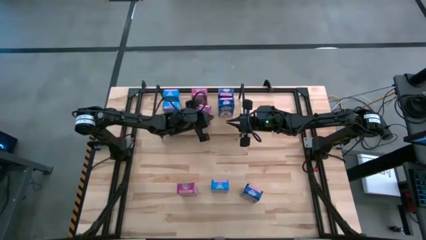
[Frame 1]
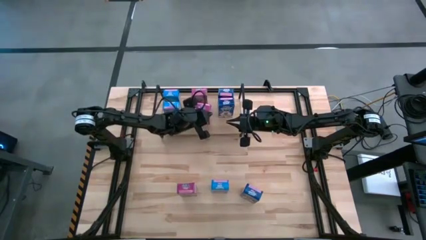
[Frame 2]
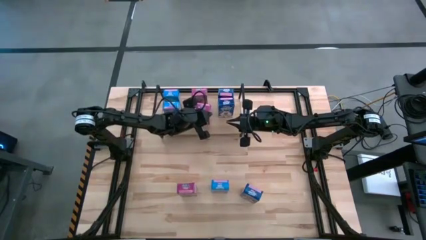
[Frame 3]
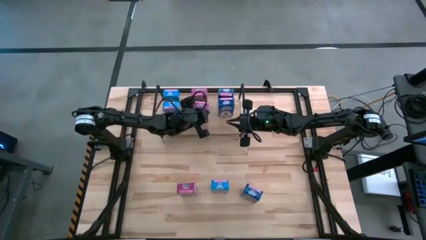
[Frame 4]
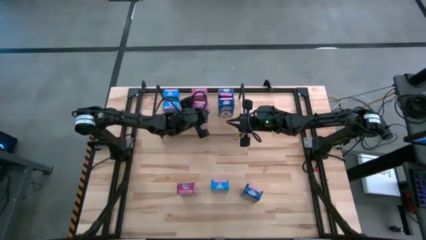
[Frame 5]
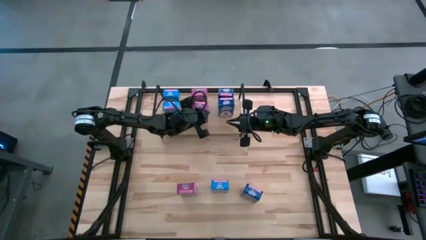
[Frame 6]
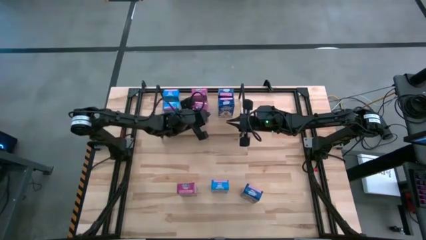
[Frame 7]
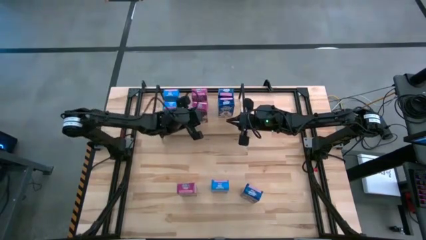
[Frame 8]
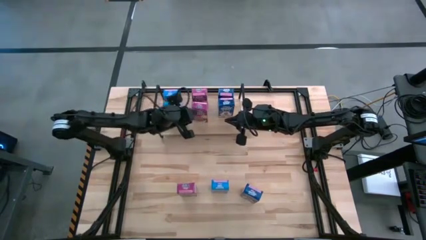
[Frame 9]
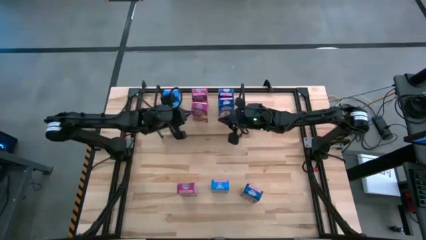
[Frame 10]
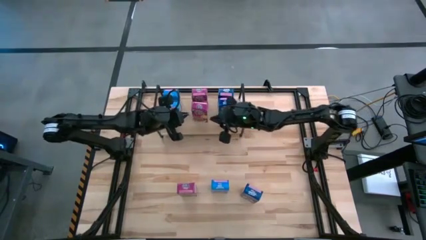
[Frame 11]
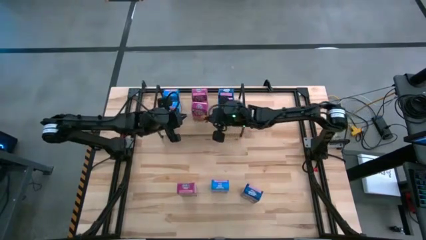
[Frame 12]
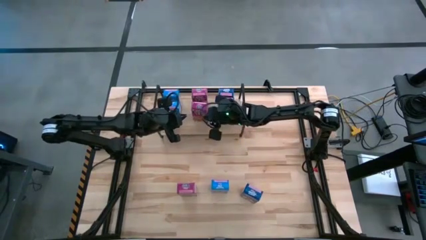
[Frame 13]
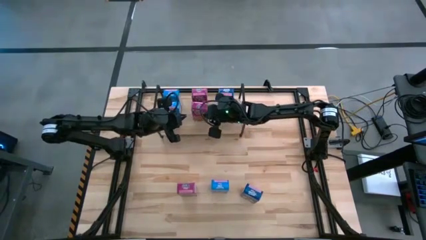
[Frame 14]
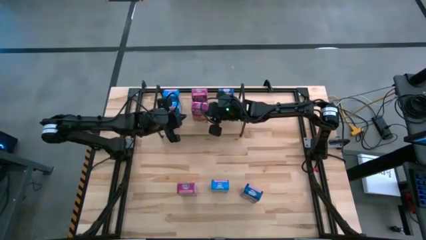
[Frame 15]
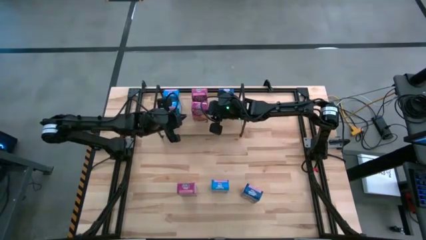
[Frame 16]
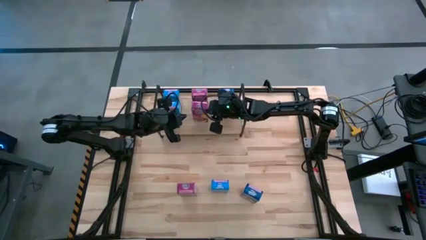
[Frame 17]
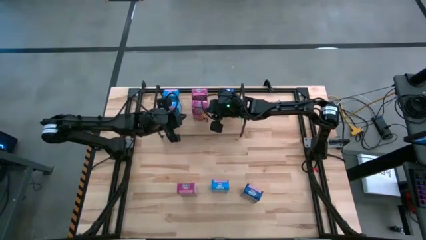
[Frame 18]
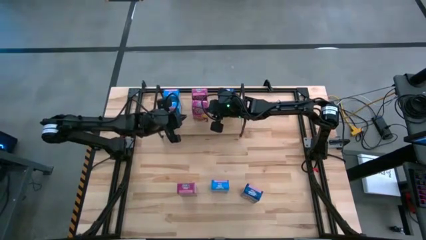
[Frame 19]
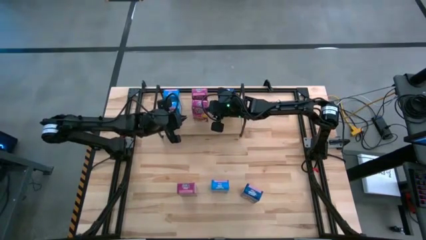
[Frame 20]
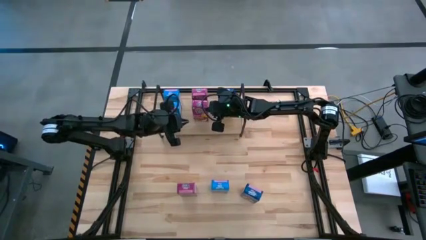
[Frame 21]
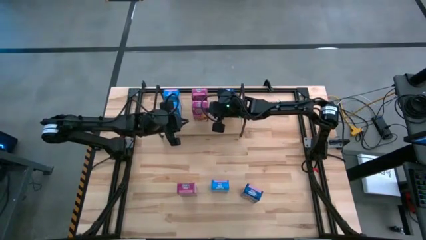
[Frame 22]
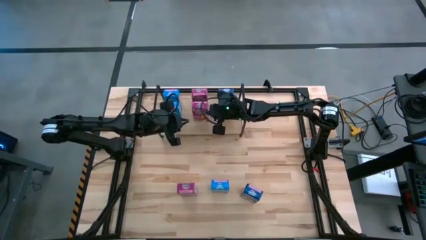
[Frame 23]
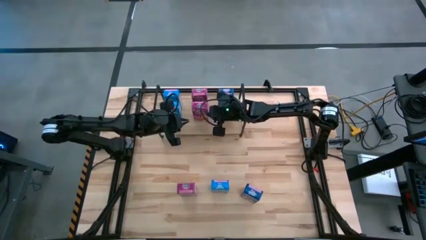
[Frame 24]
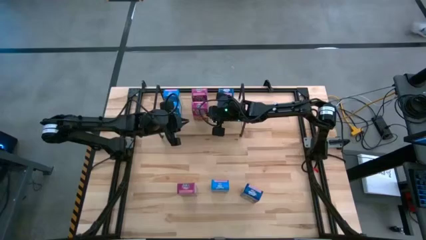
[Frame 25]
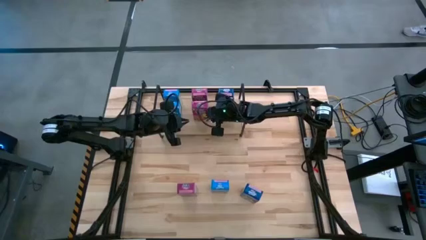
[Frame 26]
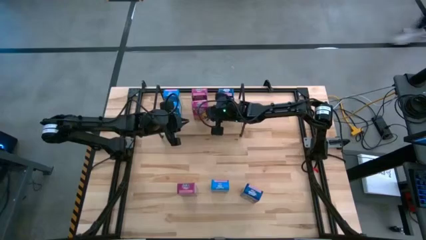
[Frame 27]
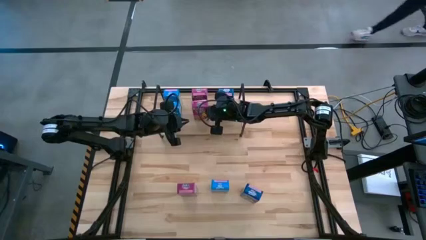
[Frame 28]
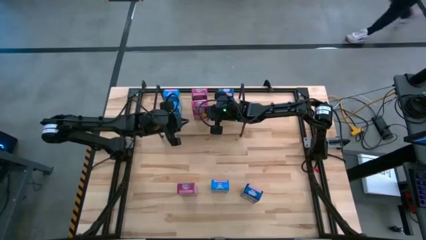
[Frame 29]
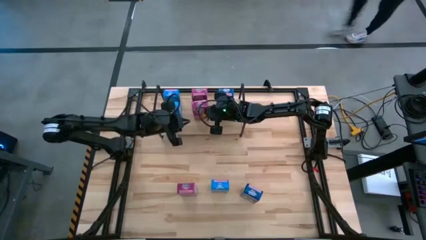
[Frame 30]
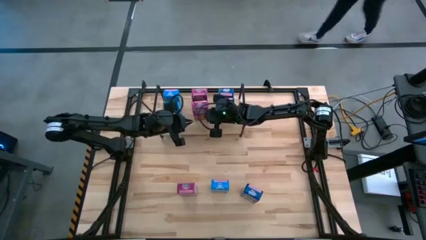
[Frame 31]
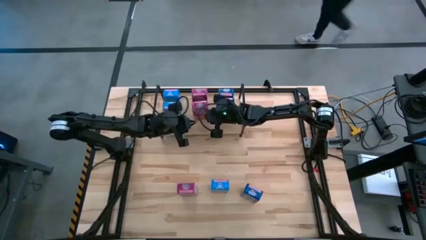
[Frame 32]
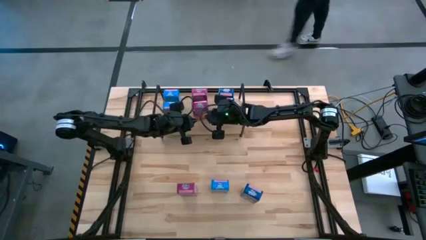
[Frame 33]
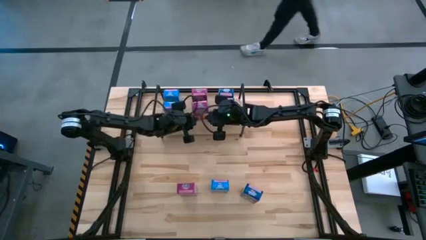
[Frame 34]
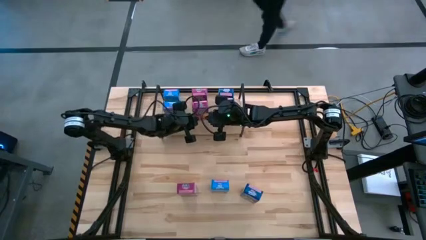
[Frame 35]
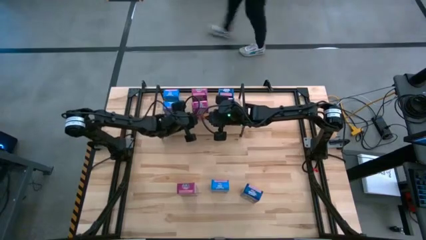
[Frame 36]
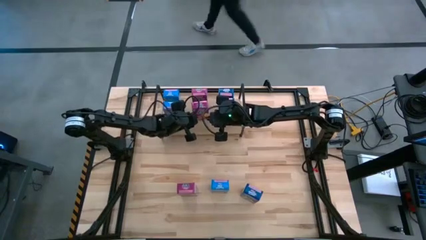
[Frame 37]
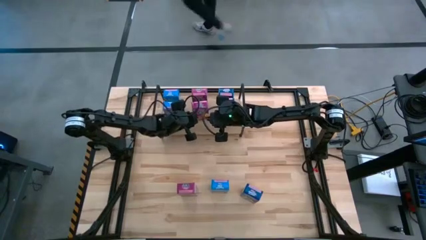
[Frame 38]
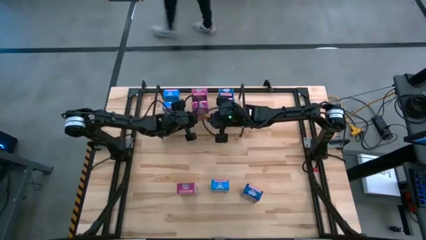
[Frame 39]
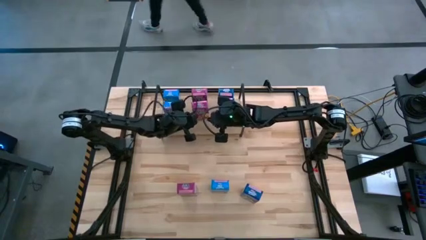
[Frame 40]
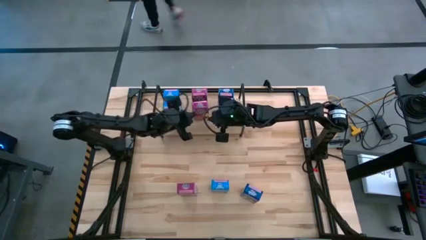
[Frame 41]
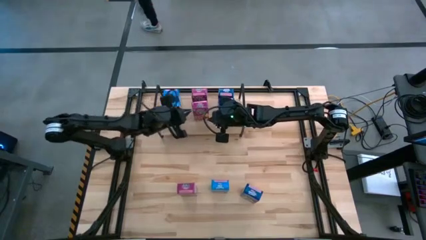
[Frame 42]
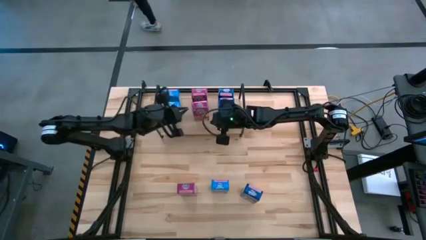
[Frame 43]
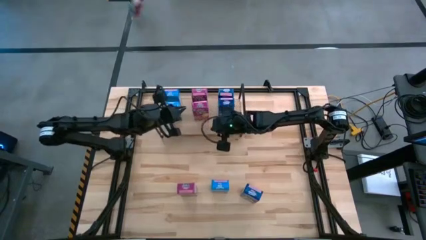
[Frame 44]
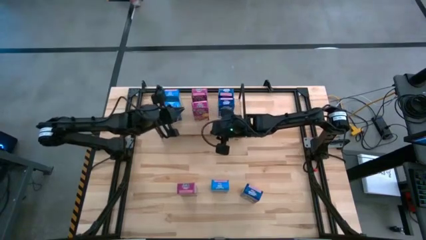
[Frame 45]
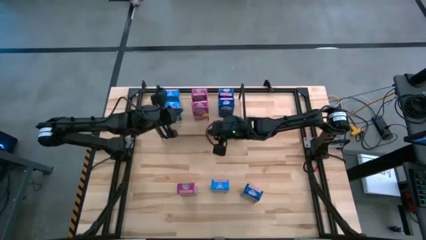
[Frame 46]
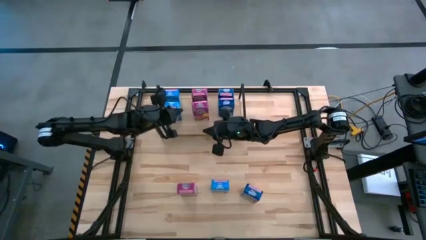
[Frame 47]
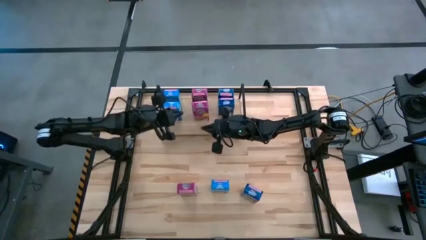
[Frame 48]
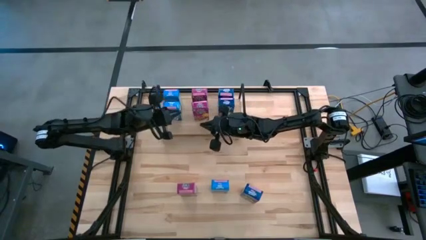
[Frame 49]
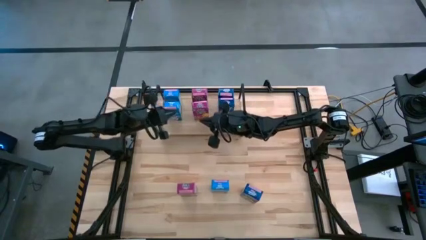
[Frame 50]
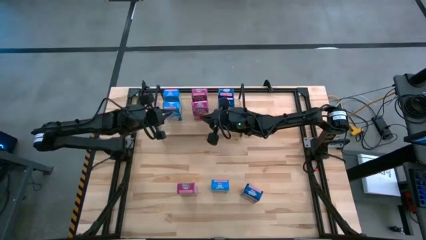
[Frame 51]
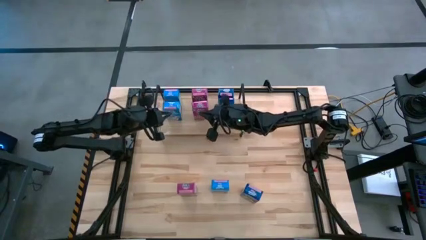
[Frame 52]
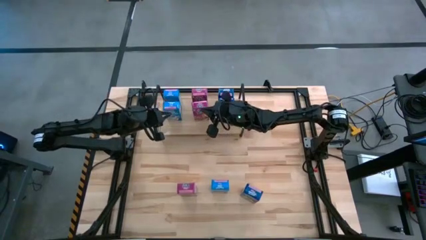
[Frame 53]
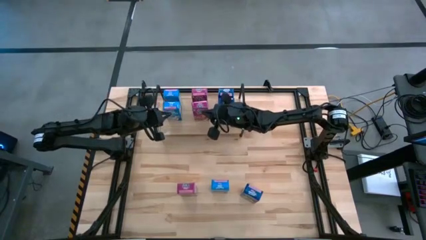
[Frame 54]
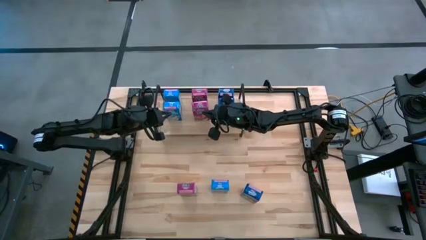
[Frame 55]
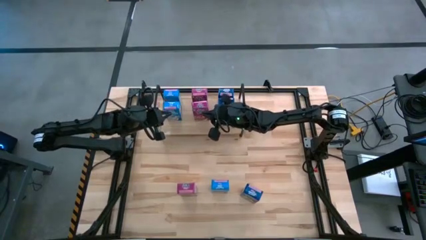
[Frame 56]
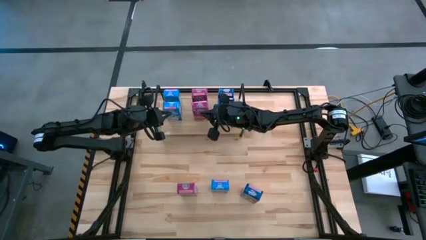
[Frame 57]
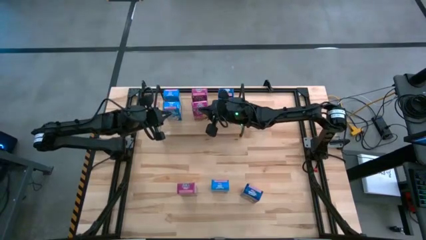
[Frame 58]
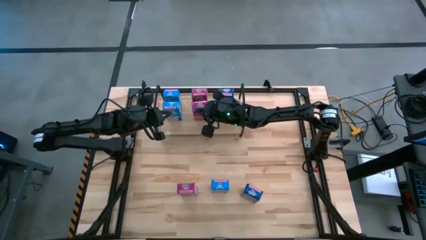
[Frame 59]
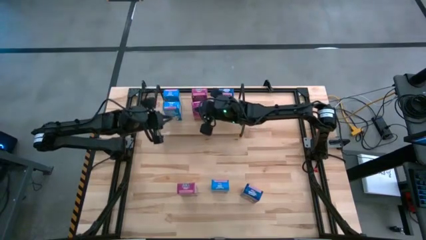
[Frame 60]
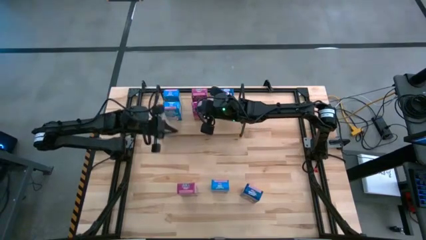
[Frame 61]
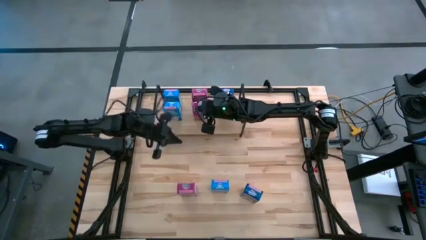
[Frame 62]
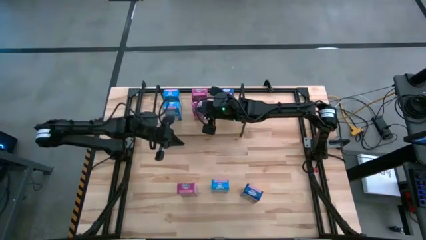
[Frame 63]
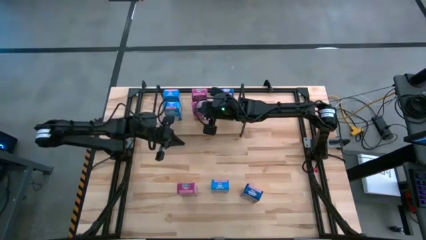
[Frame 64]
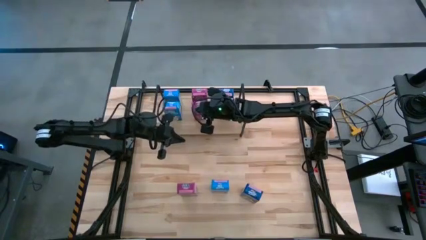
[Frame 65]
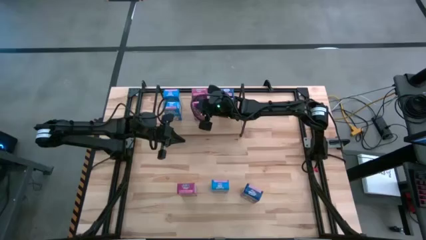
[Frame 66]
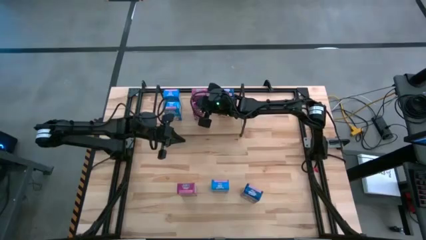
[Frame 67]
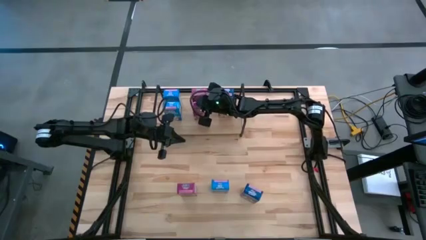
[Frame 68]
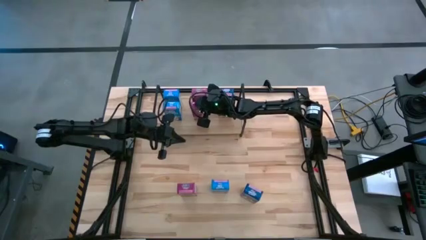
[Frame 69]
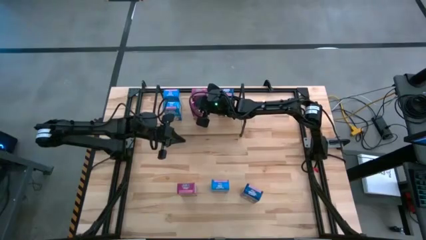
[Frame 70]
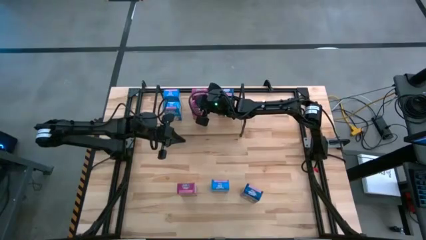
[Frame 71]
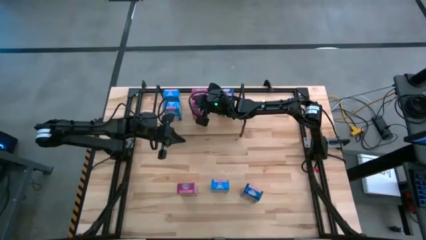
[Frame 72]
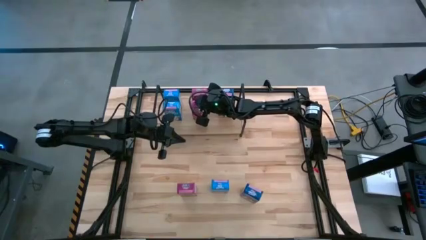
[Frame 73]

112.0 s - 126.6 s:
Task: Stack cereal on shelf
Put the right violet cereal box on the shelf aligned with the violet cereal box

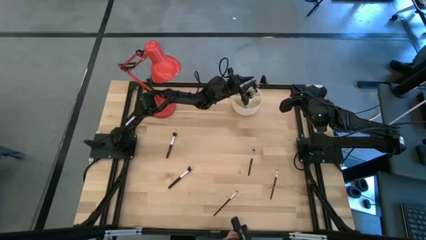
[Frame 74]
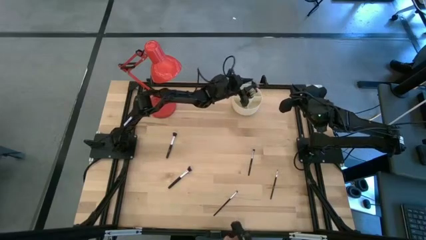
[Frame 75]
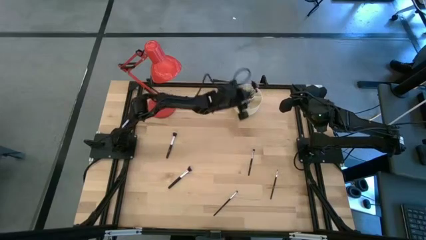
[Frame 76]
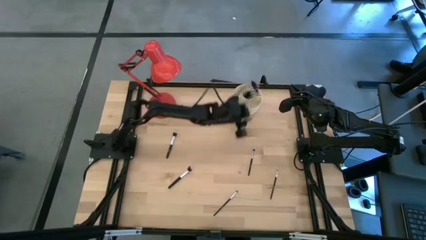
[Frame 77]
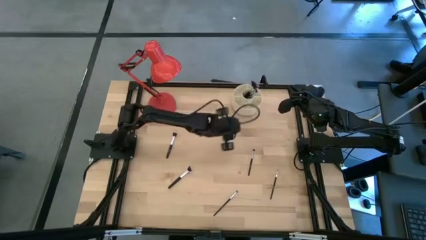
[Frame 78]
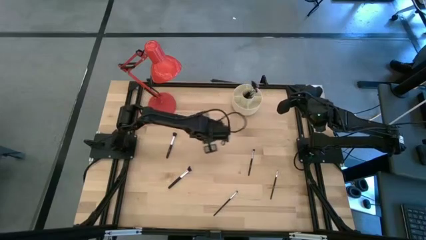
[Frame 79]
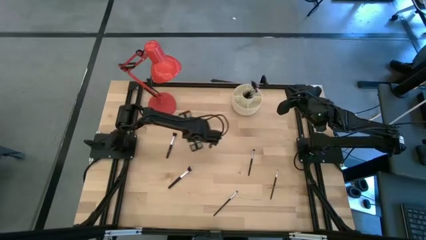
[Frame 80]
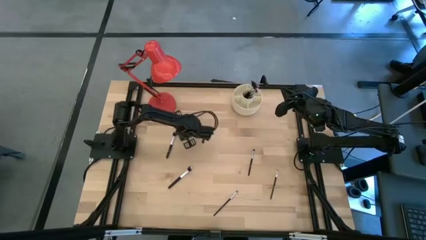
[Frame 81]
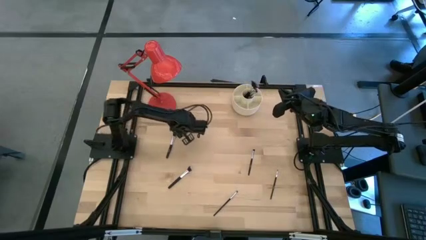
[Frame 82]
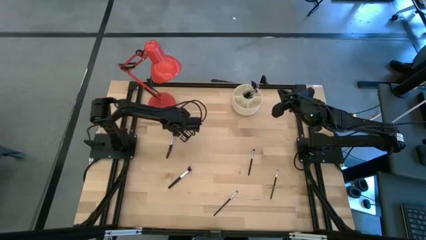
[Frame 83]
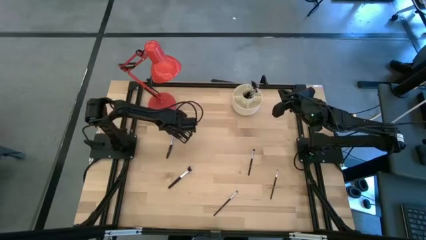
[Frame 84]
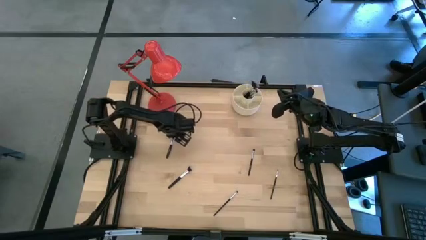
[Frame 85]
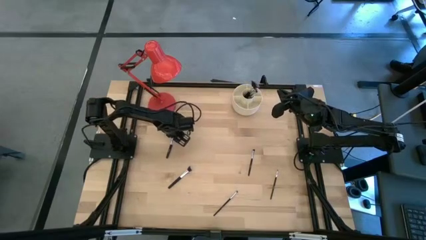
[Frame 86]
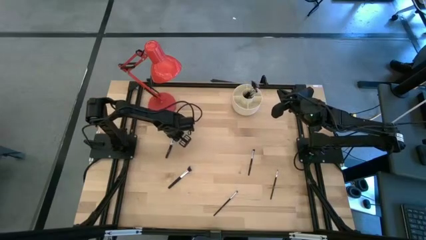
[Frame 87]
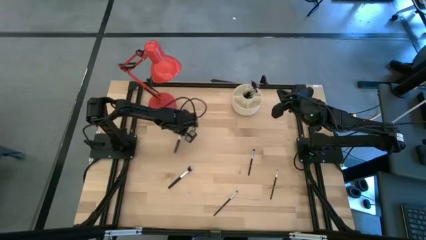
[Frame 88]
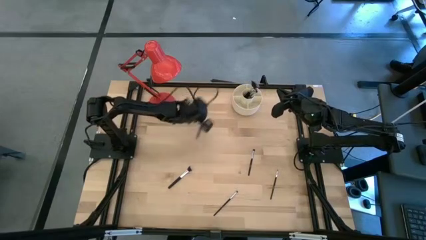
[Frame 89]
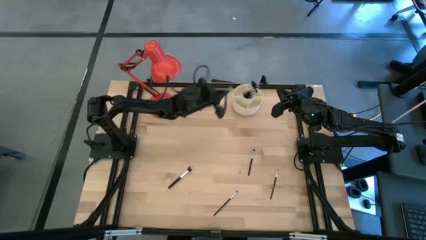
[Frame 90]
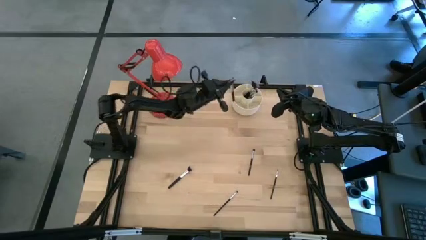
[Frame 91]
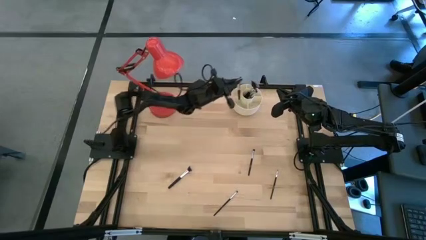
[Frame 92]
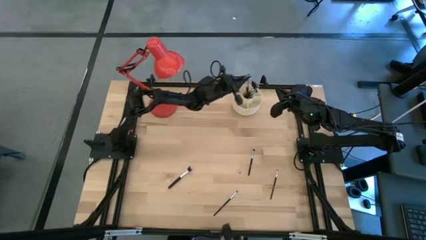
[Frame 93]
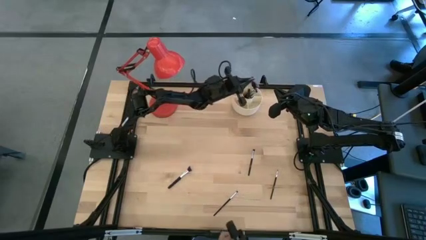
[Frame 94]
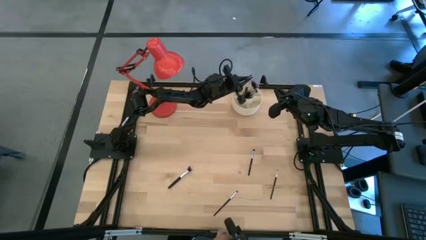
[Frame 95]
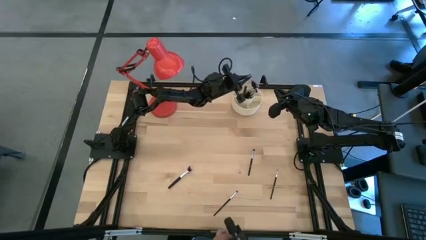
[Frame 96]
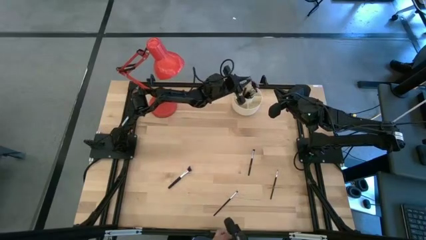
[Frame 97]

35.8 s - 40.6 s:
Task: Put items in baskets/containers
Put the black powder brush into the white organizer
